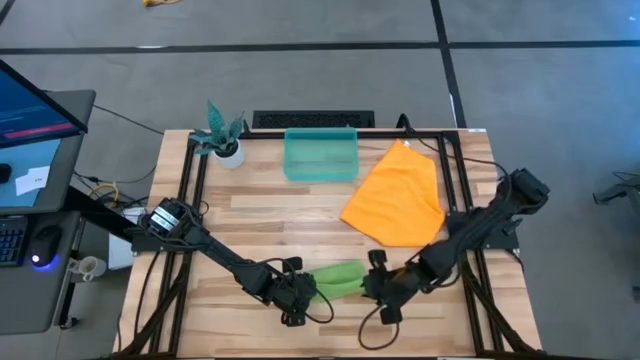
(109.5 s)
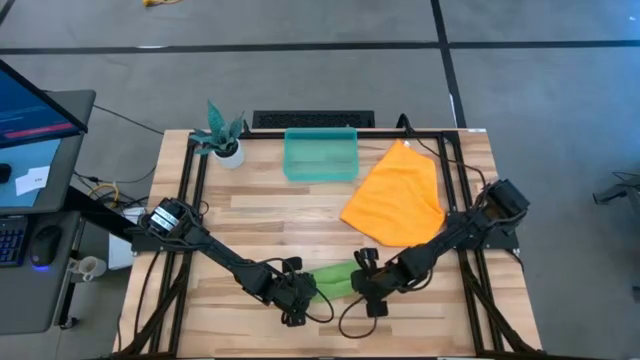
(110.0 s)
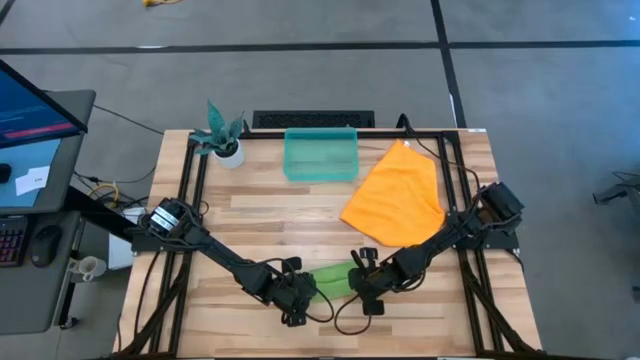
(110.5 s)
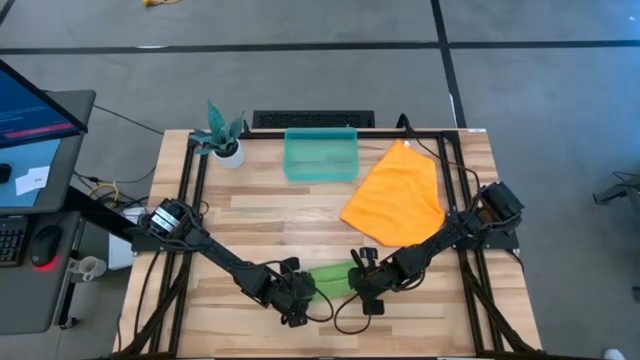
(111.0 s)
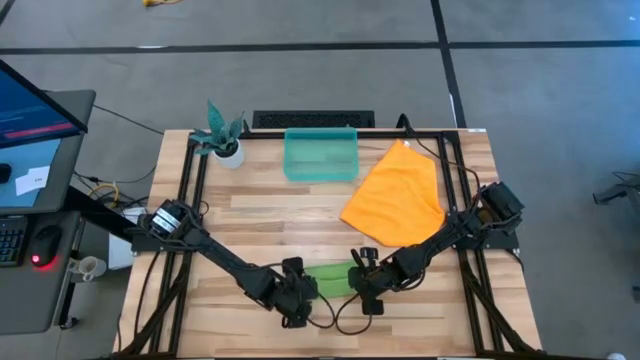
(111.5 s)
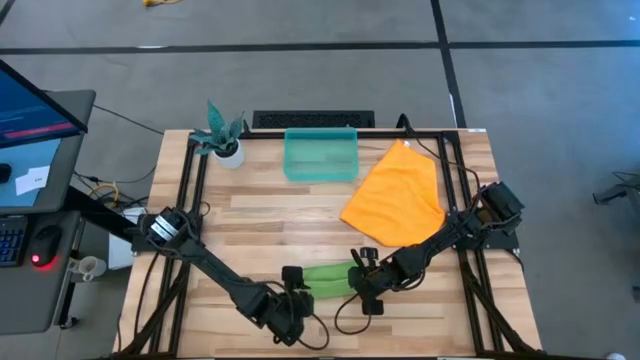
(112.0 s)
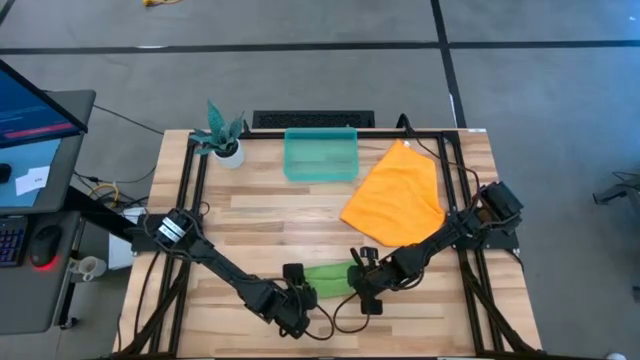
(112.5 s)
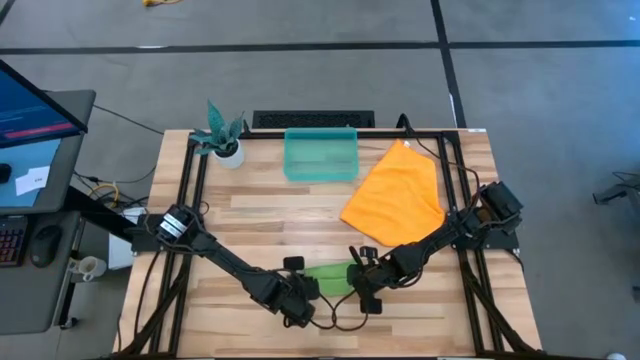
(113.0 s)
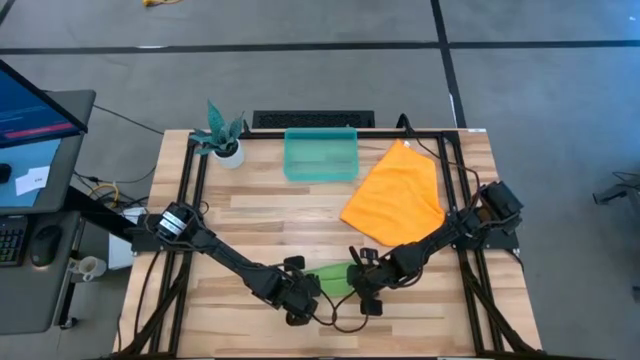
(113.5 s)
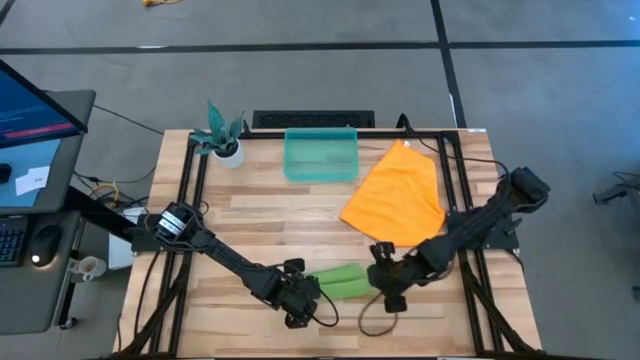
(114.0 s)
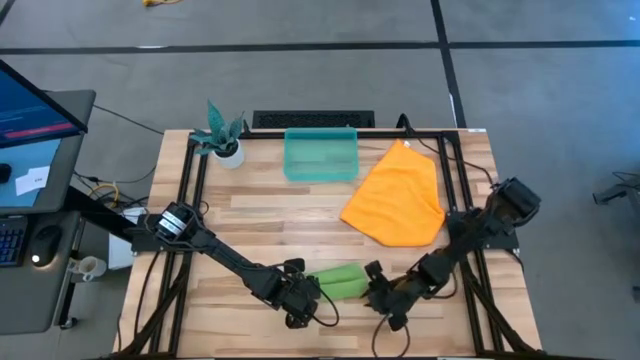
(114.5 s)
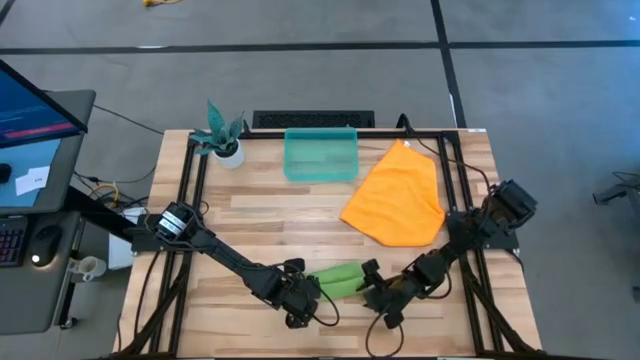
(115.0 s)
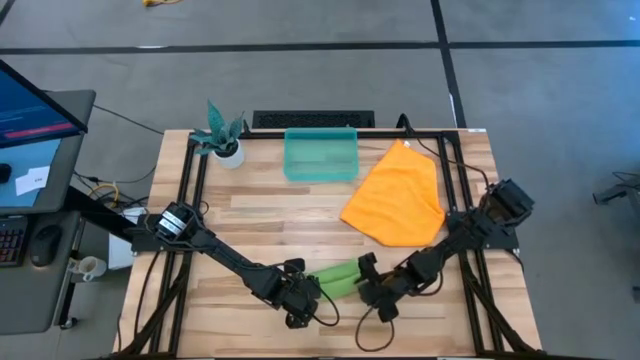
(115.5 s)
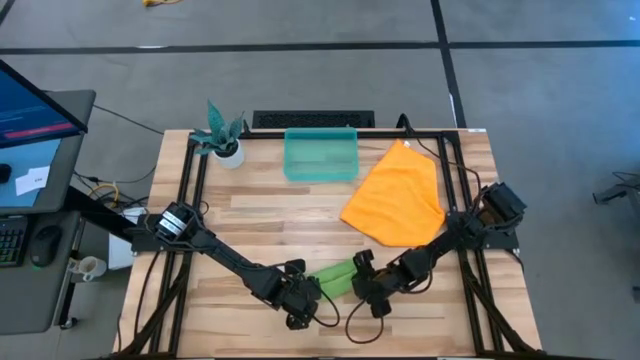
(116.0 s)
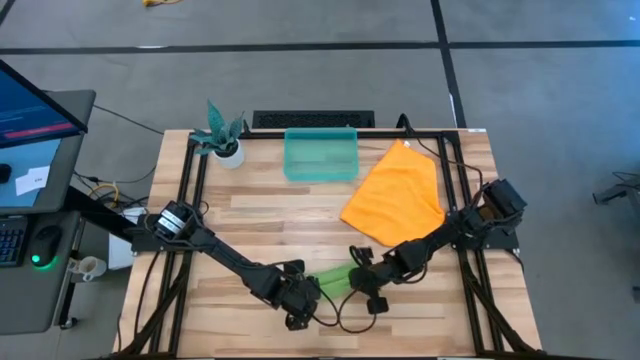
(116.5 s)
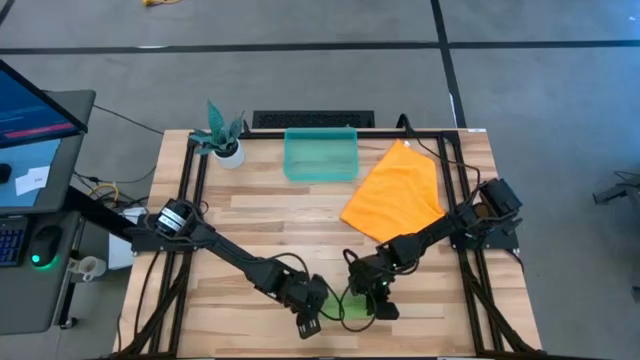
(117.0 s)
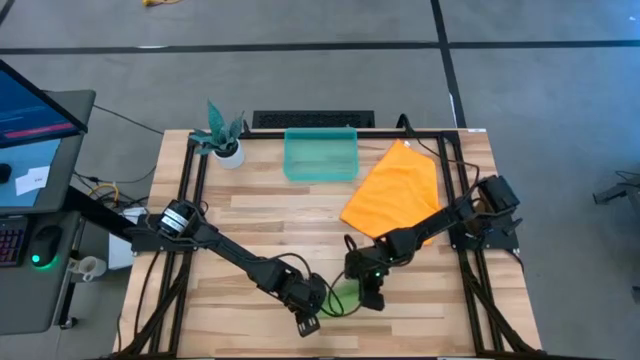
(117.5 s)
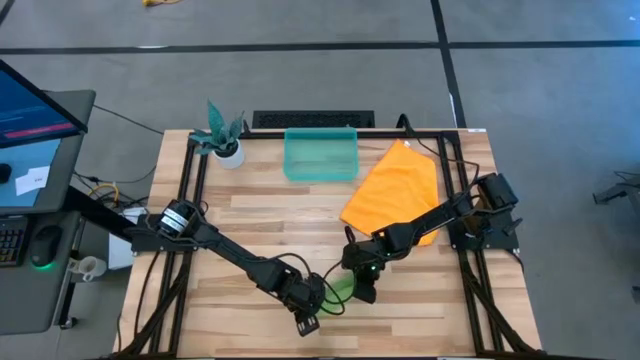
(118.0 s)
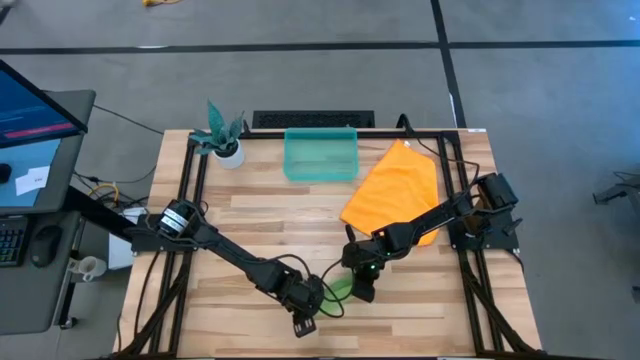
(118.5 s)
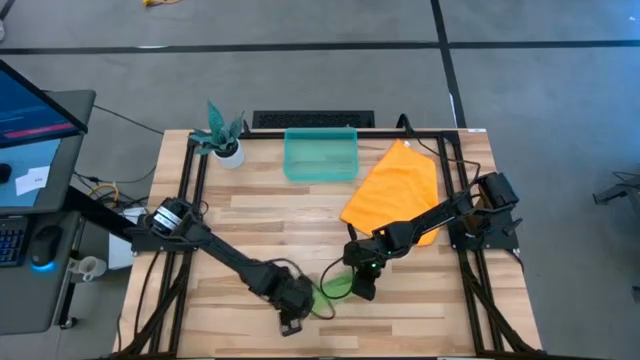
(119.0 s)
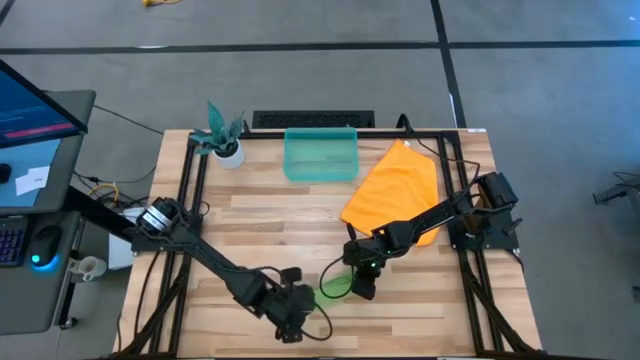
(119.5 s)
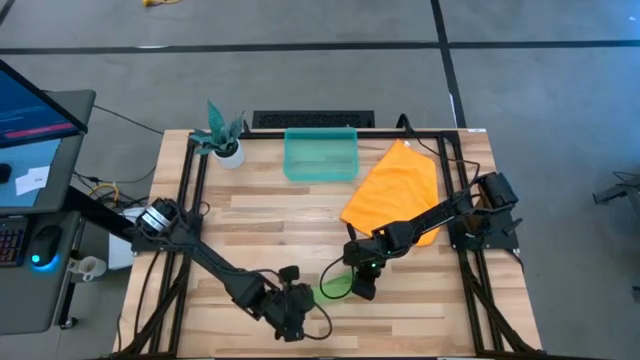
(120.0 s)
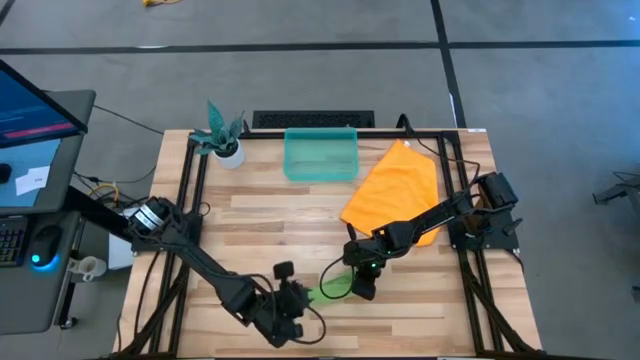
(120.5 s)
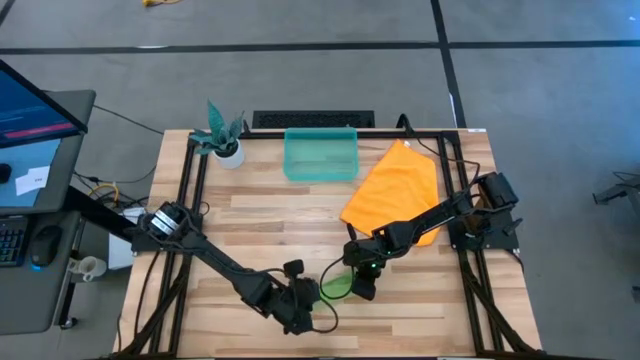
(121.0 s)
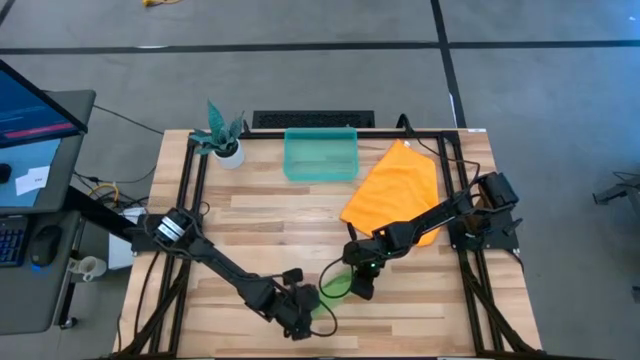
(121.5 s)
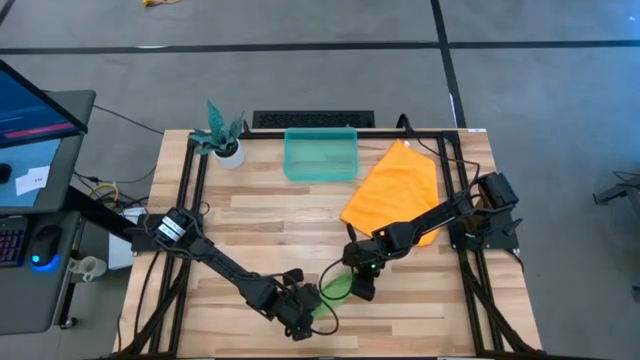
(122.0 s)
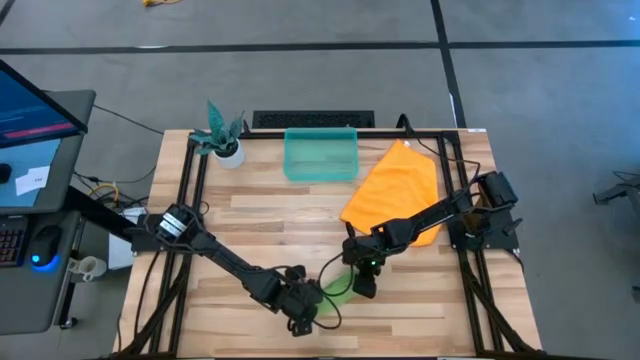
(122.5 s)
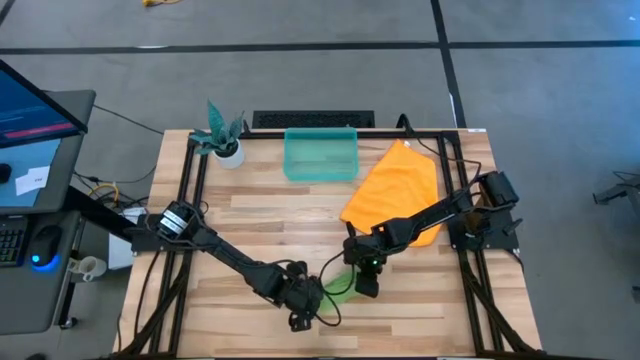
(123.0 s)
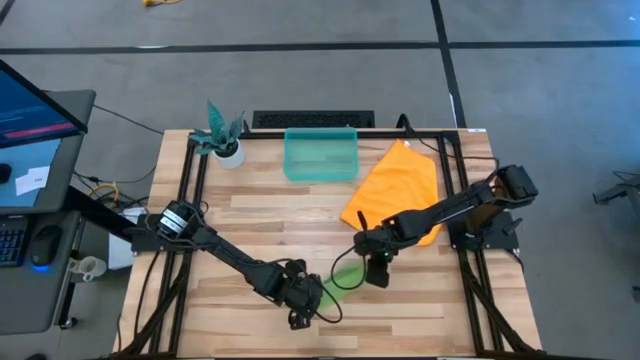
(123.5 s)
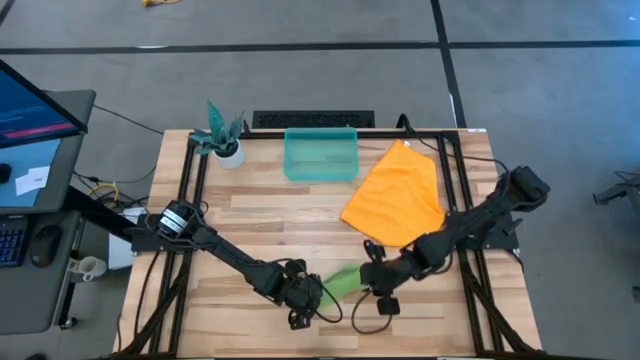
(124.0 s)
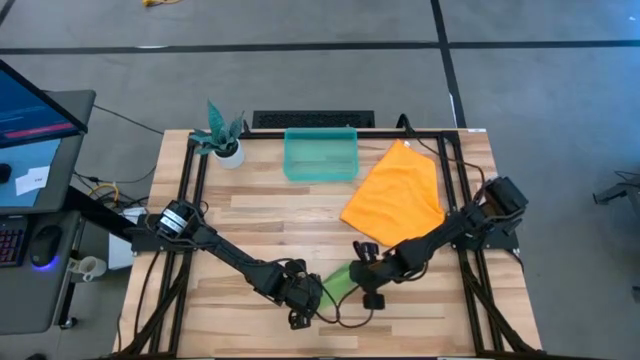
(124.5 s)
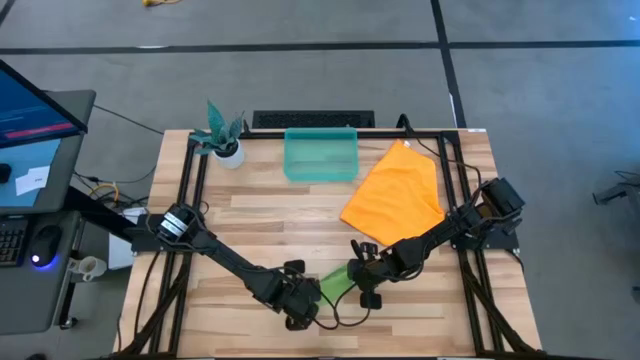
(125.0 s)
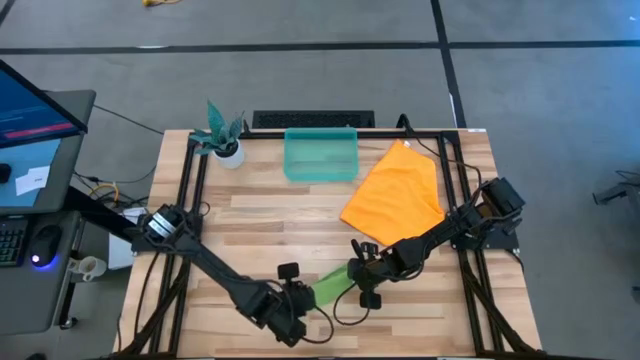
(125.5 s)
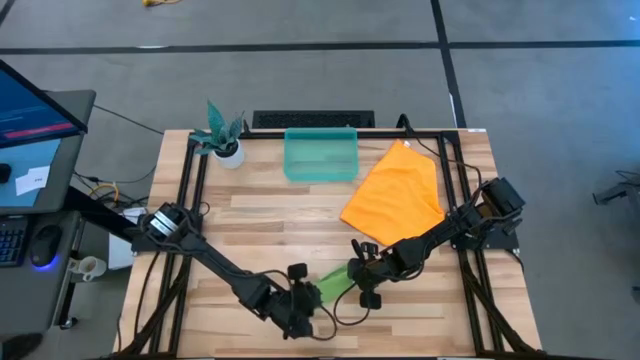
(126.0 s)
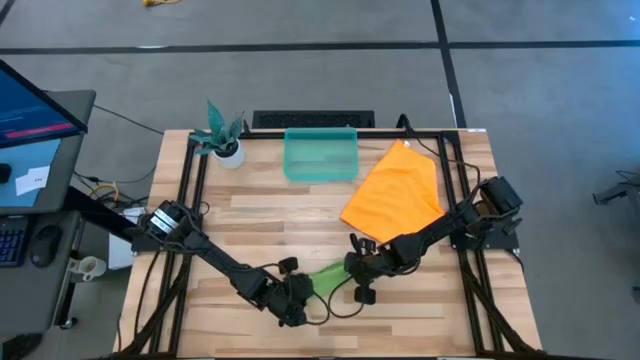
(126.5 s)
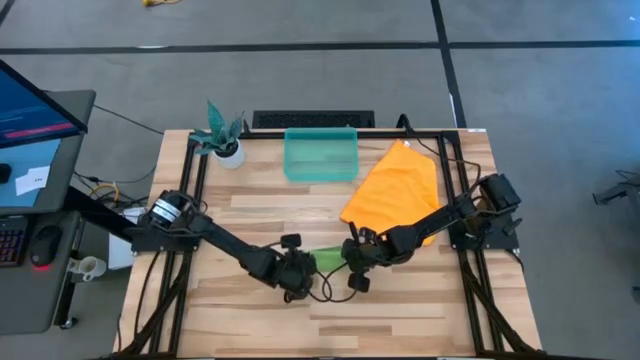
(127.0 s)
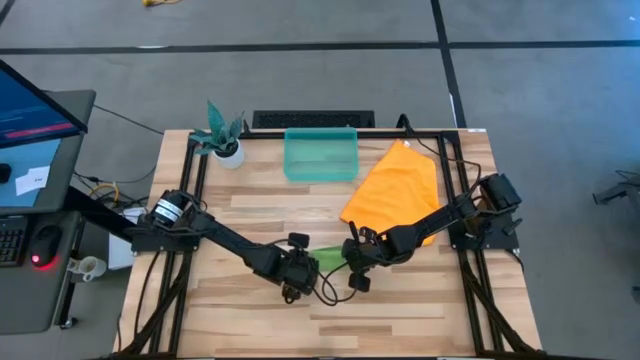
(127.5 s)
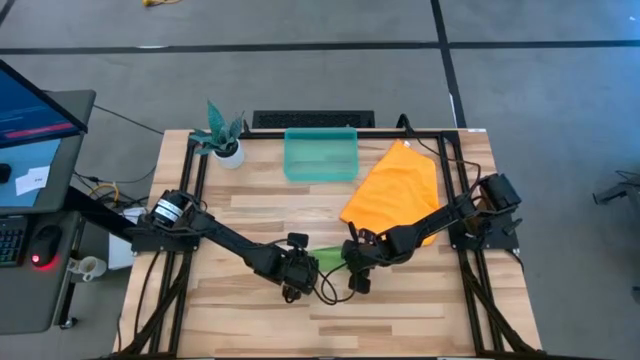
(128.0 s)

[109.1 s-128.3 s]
Task: Roll microfiber towels into tight, uniform cylinder then place into a basket
Roll the green towel
